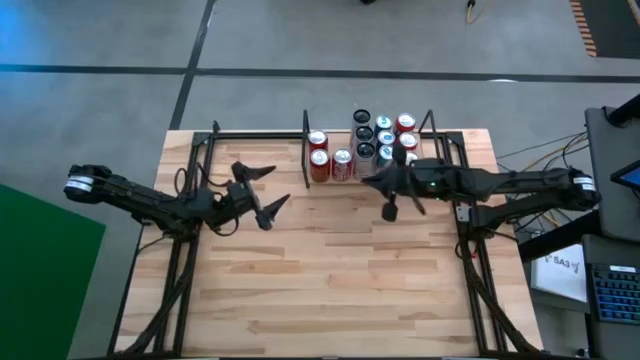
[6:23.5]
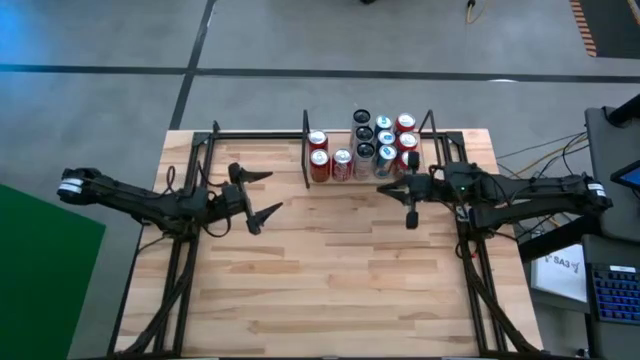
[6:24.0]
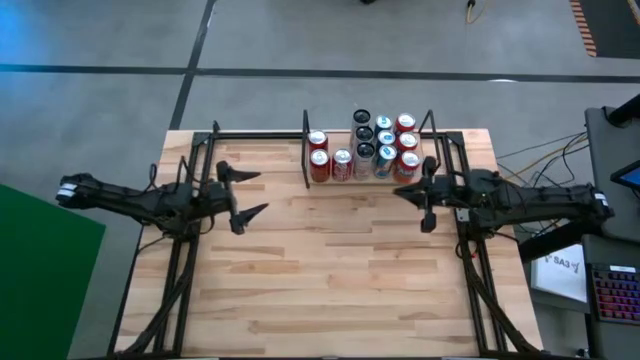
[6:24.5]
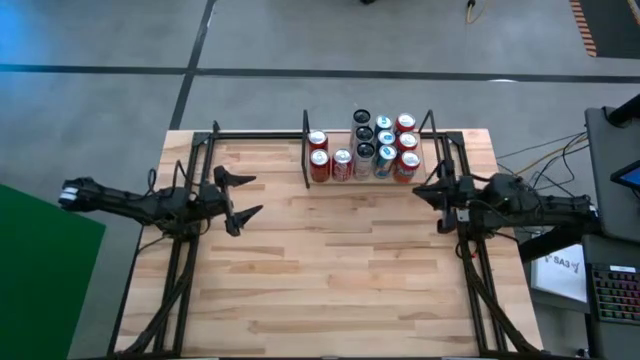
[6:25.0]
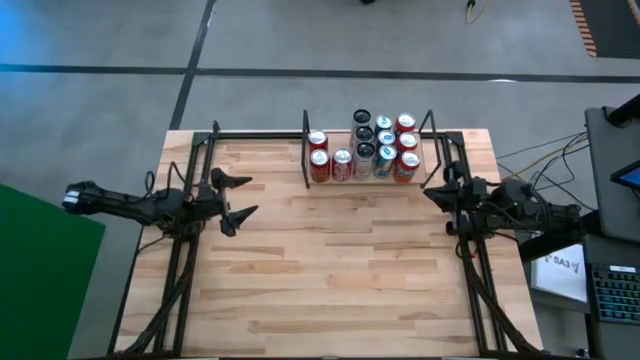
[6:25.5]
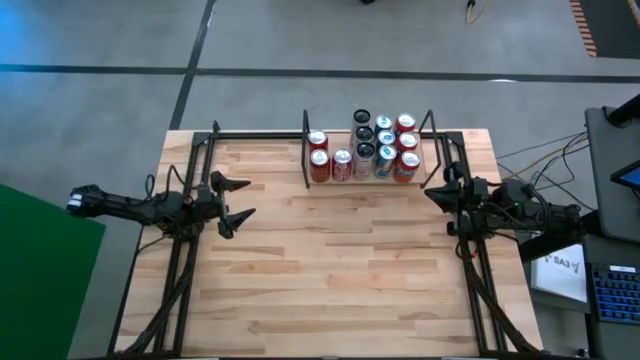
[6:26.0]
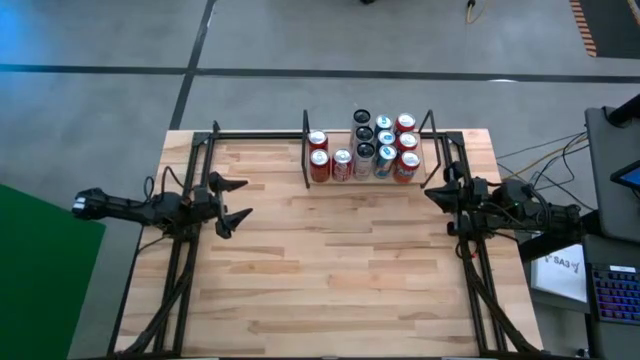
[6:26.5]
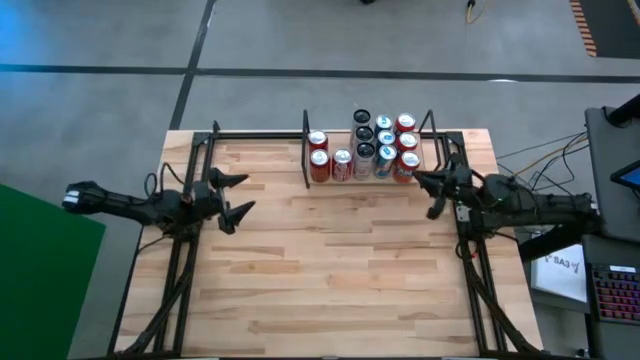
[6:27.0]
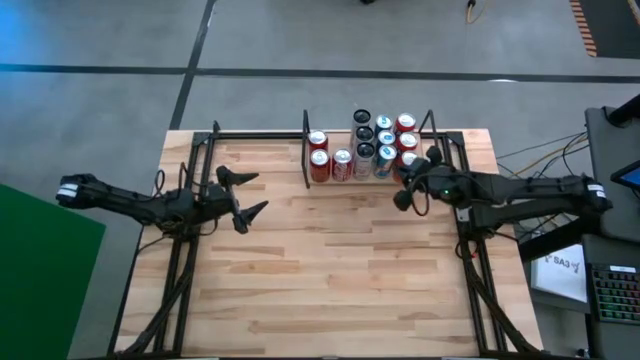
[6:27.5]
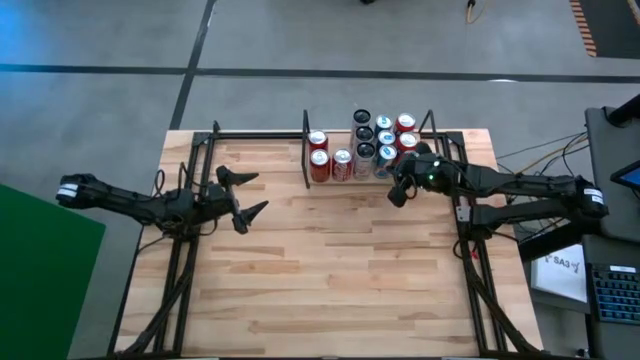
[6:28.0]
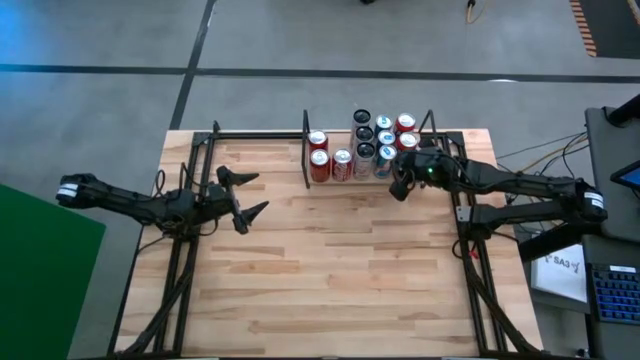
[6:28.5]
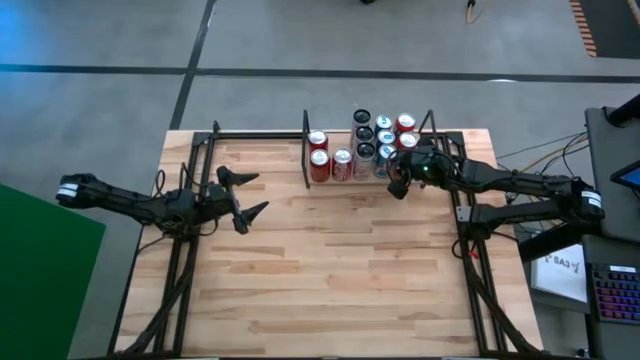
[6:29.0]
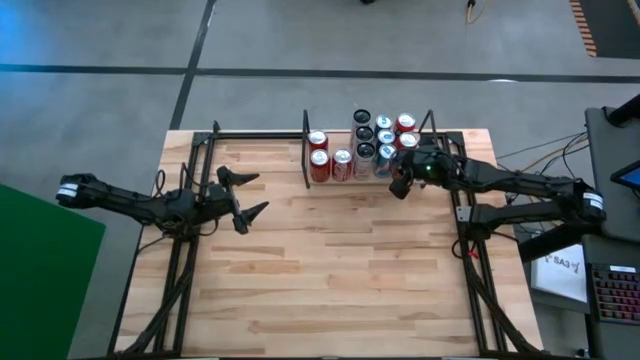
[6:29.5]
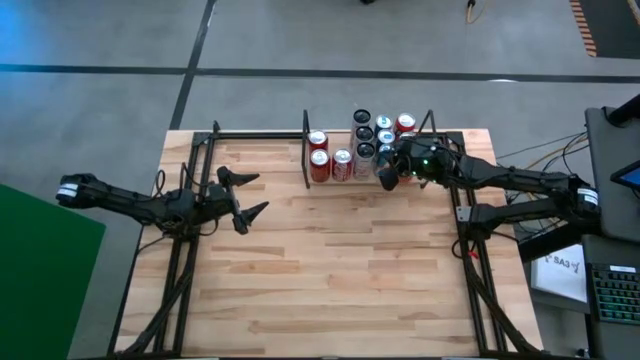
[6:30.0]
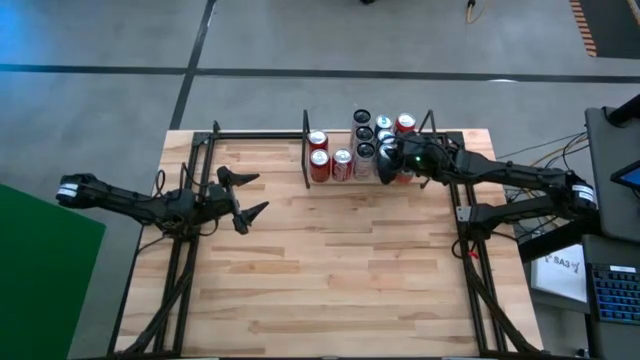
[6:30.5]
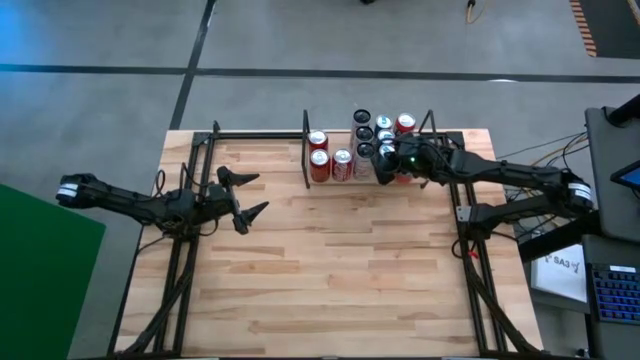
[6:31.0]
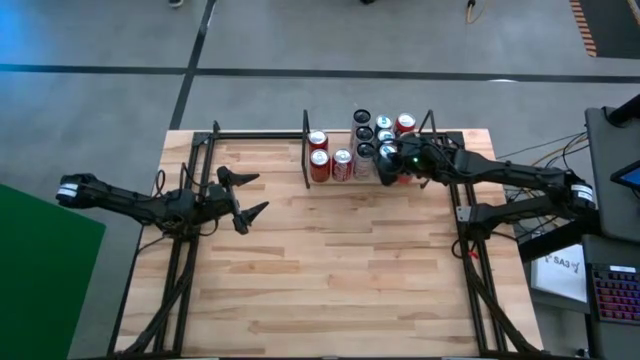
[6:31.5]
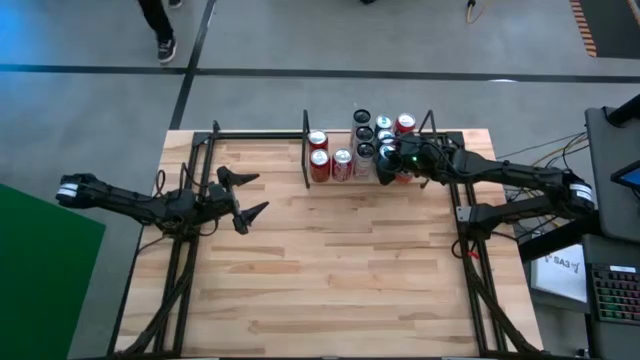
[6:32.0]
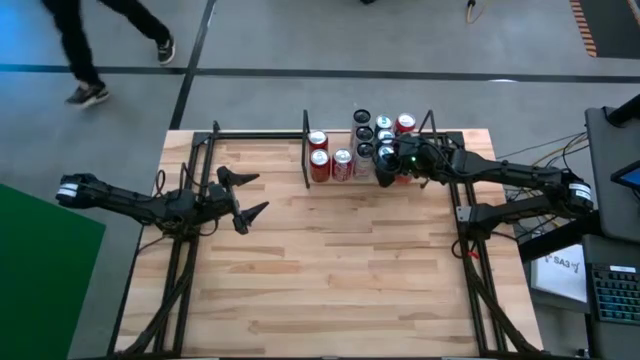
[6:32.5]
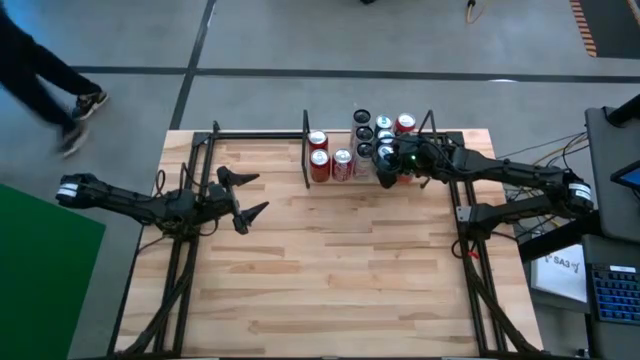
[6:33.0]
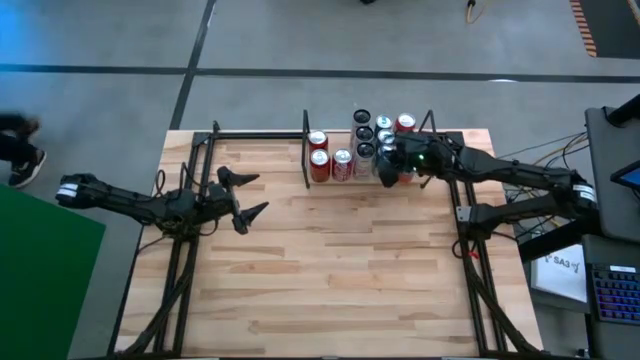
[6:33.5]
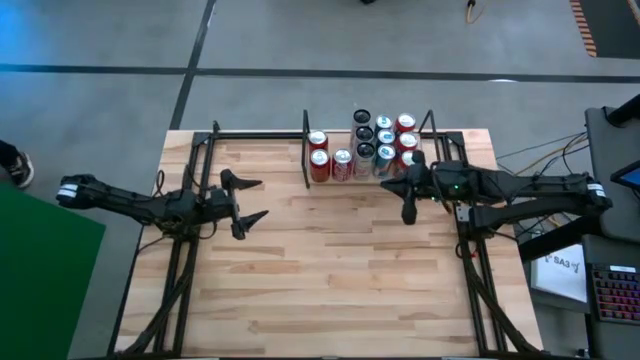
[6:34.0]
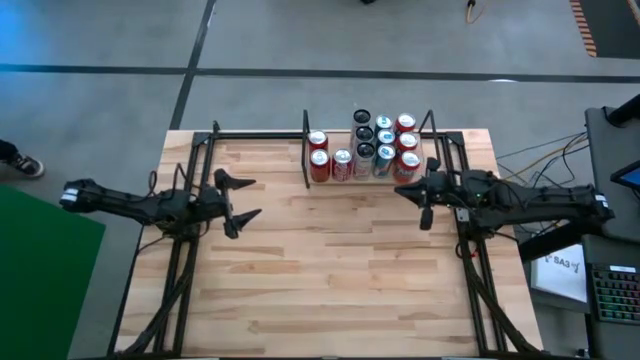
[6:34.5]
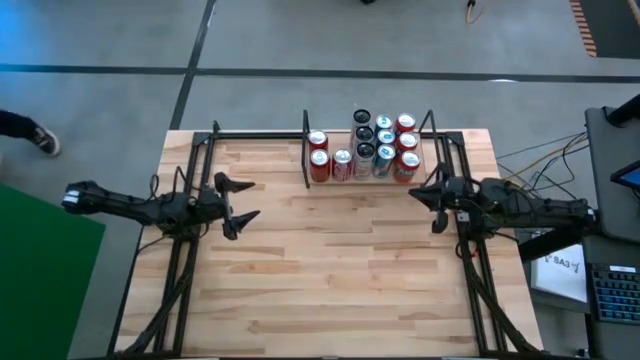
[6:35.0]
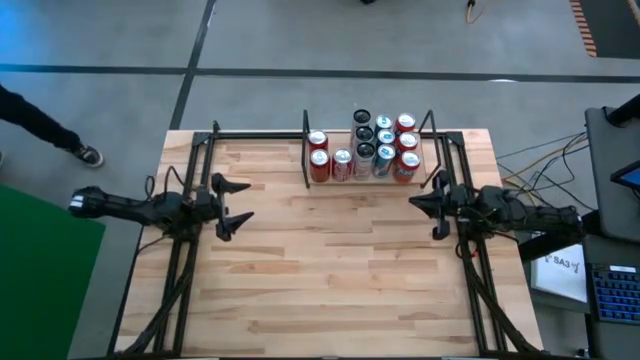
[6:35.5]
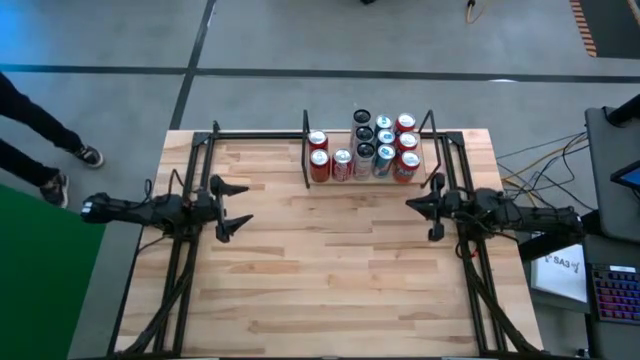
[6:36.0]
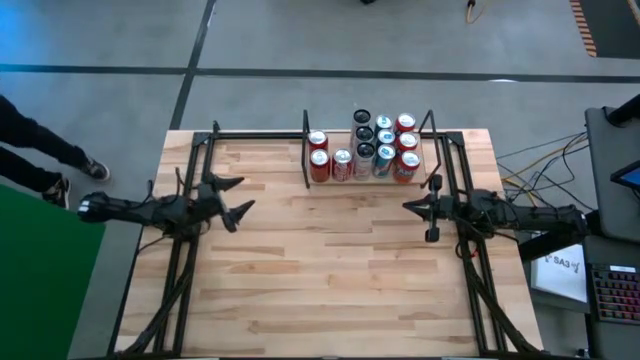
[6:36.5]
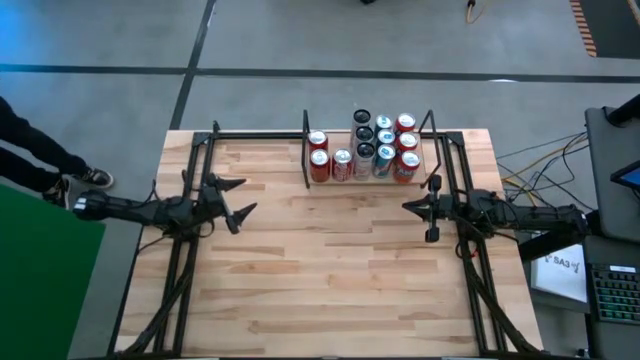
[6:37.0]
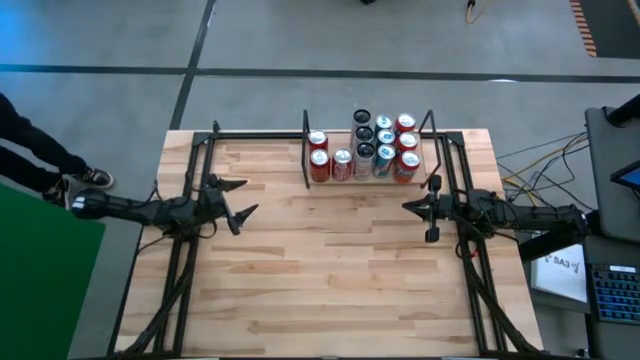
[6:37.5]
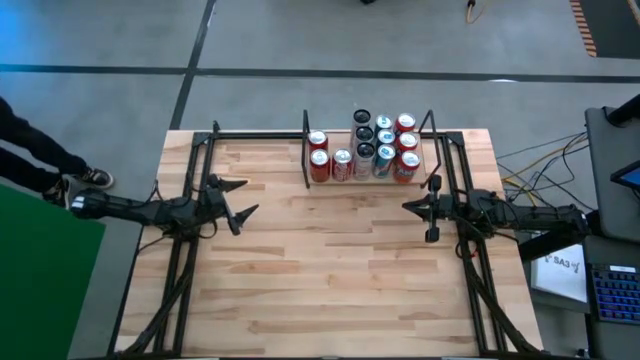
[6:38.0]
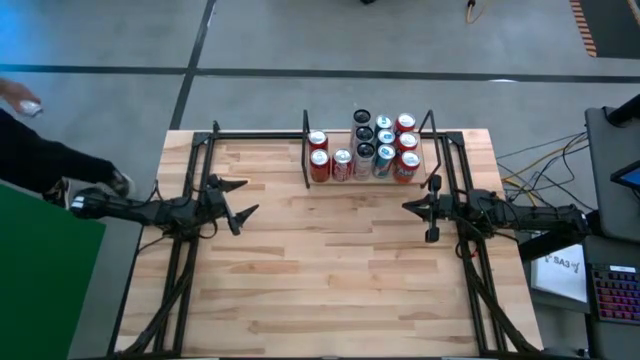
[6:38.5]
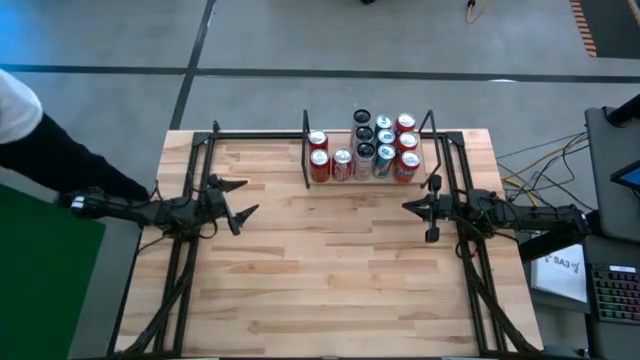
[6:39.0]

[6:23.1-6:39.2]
Task: Place canned beverage on shelf
Return to Home Position

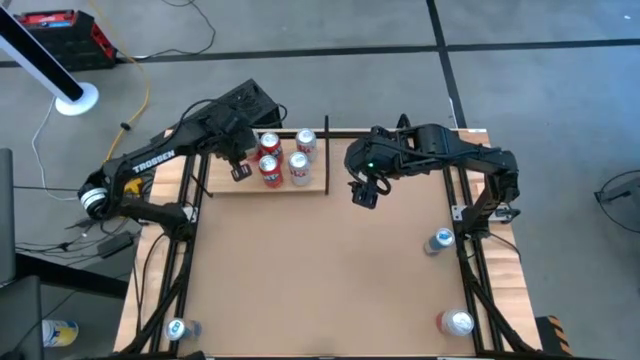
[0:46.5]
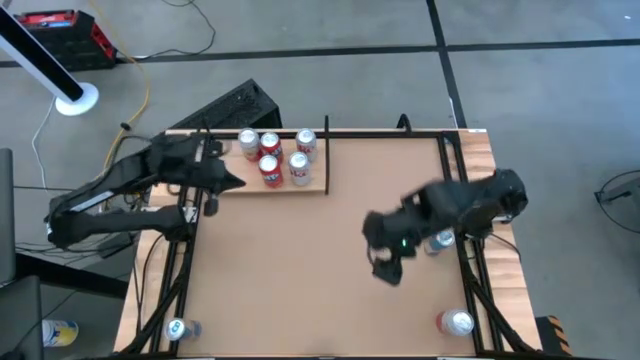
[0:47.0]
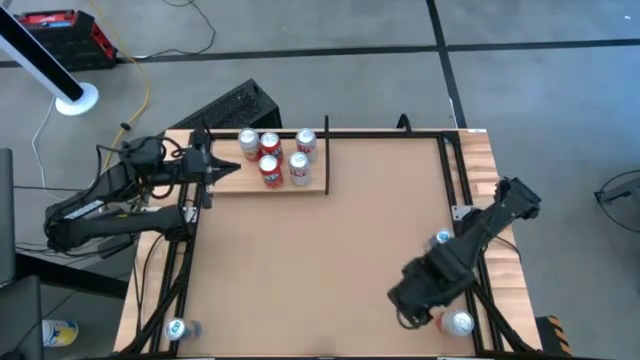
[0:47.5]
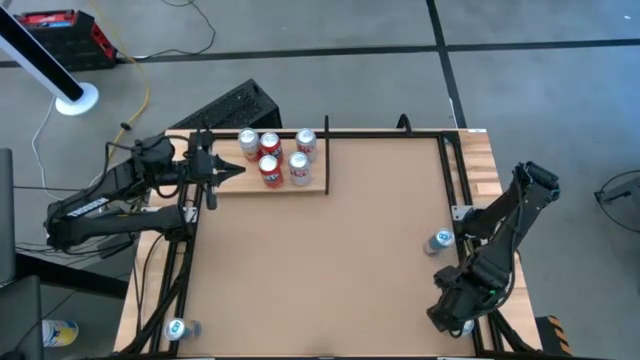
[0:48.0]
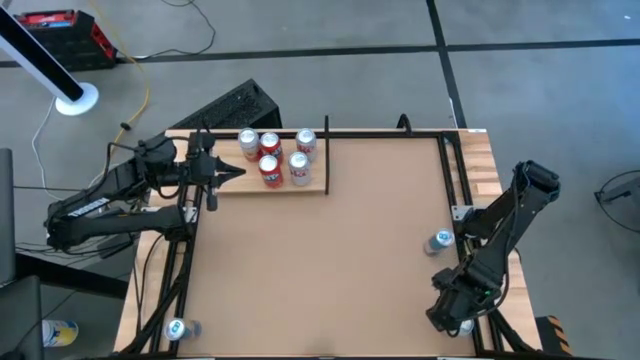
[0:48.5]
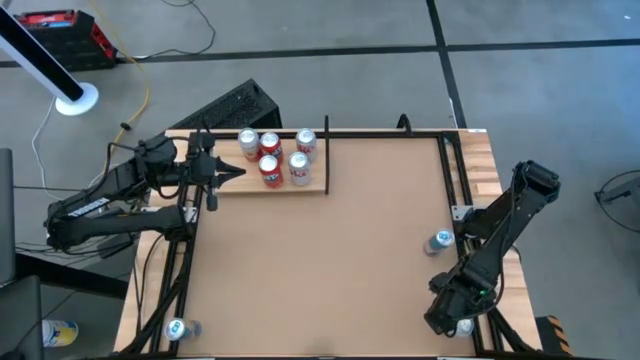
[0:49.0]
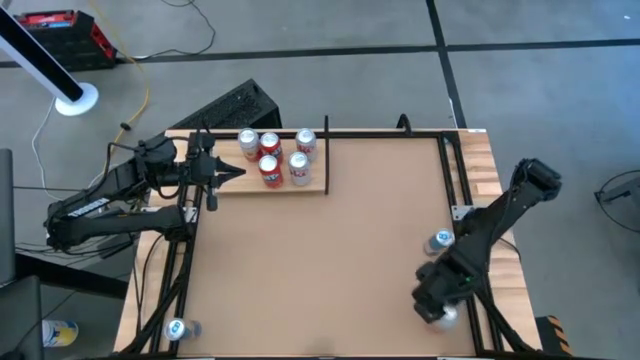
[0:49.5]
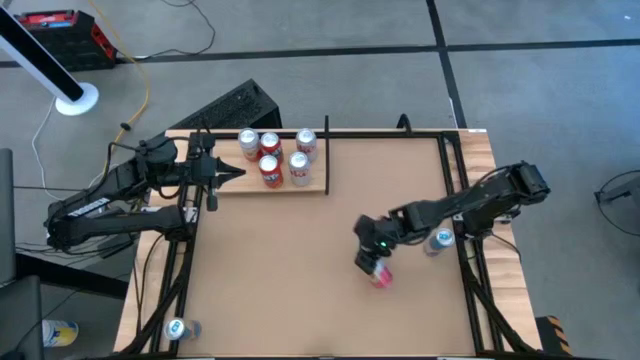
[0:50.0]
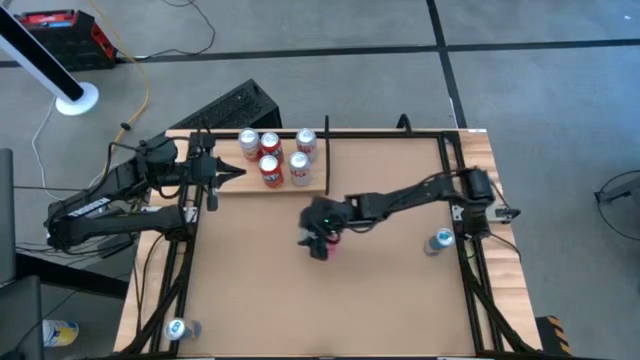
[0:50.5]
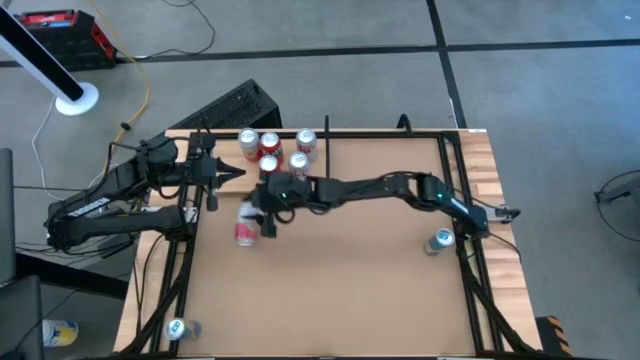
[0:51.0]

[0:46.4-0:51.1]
Task: Place canned beverage on shelf
Put the pink-white soda can on the shelf aligned with the other pink-white soda can

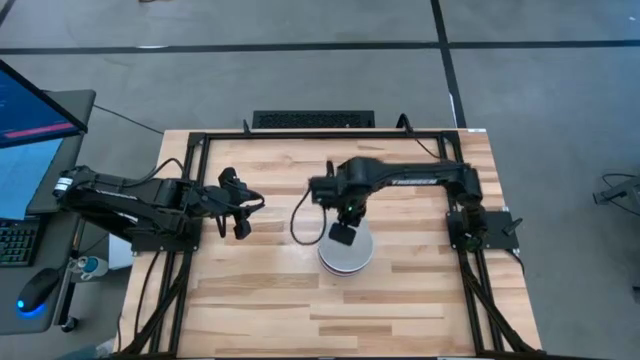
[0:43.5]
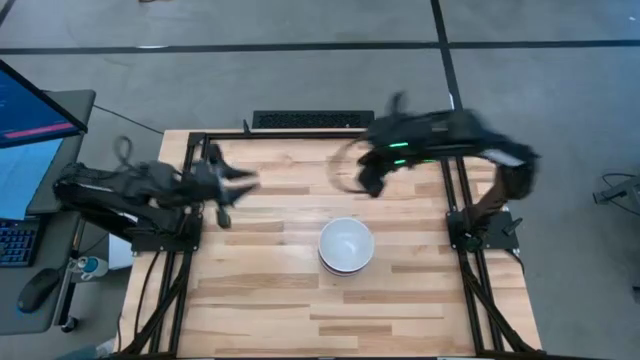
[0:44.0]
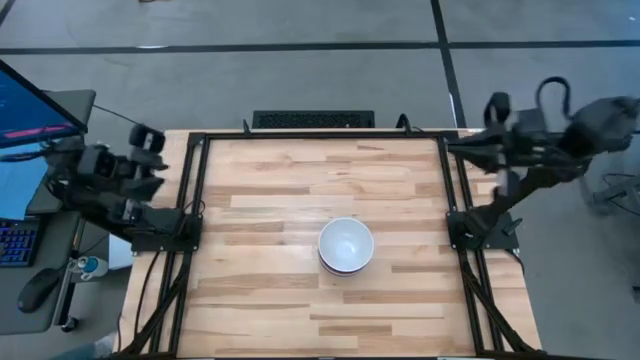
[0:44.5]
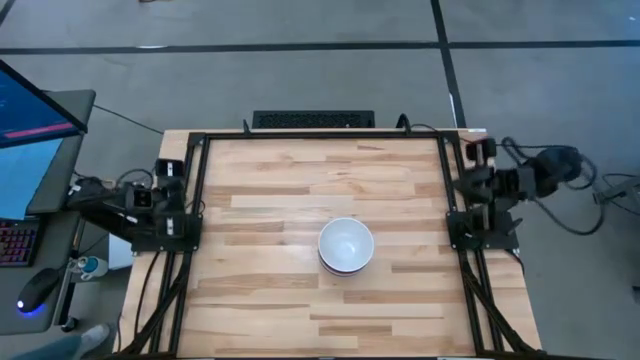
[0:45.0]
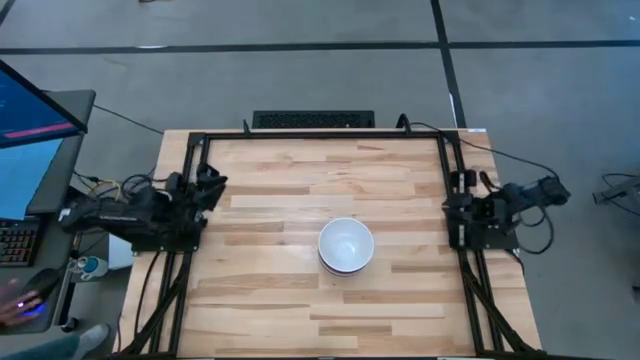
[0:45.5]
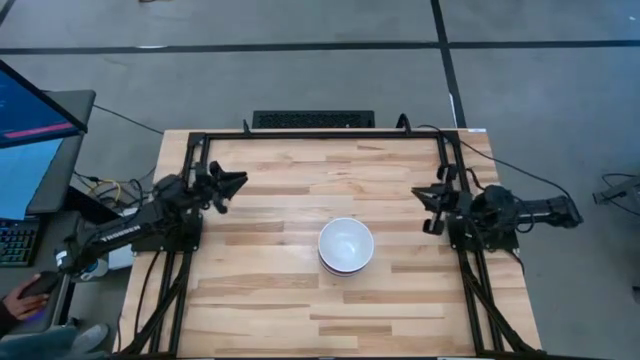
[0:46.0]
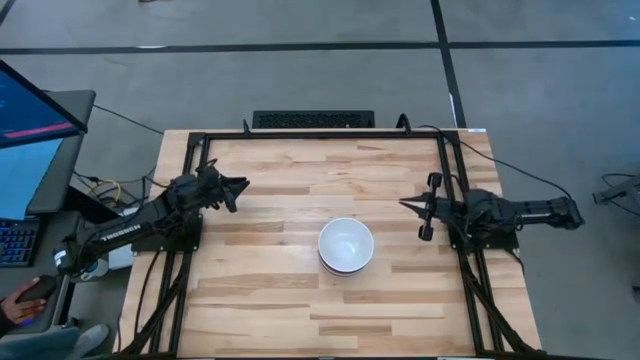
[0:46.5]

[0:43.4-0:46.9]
Task: Nest bowls inside each other
Return to Home Position
